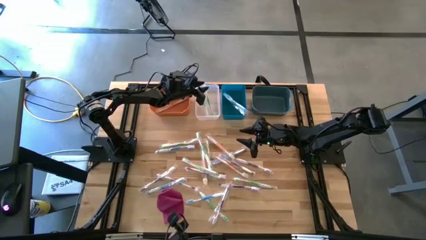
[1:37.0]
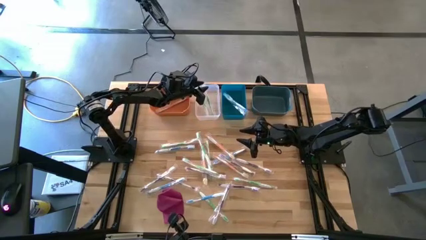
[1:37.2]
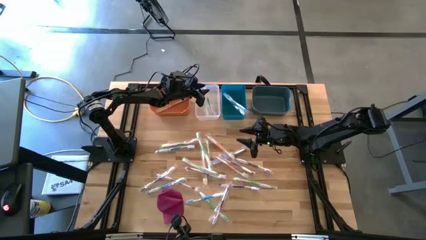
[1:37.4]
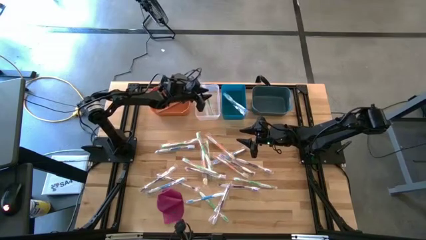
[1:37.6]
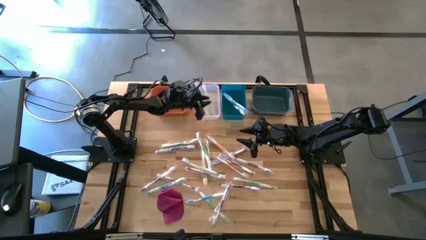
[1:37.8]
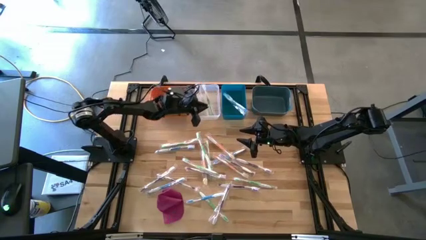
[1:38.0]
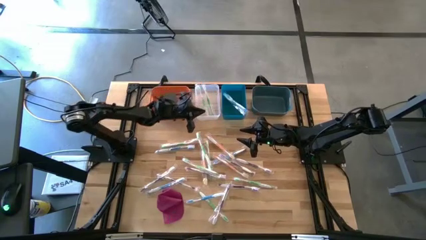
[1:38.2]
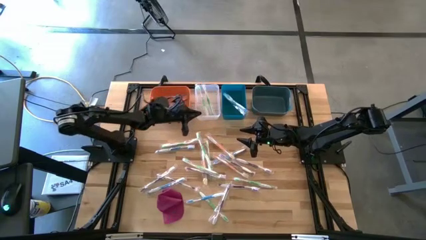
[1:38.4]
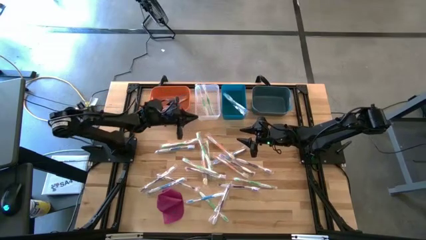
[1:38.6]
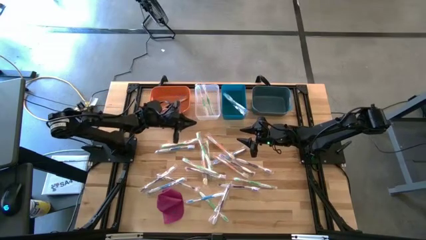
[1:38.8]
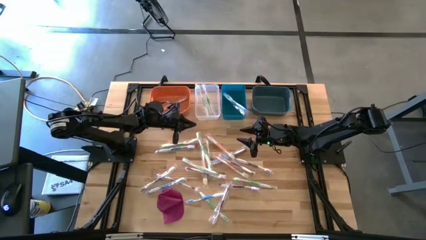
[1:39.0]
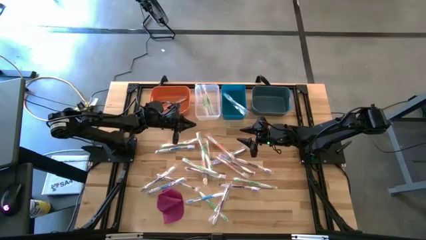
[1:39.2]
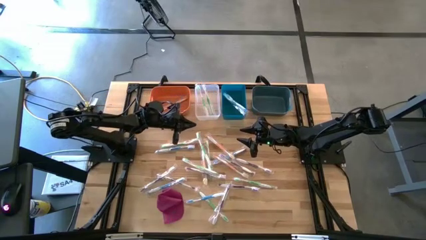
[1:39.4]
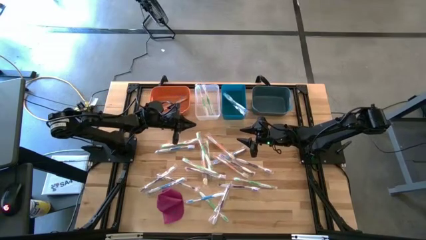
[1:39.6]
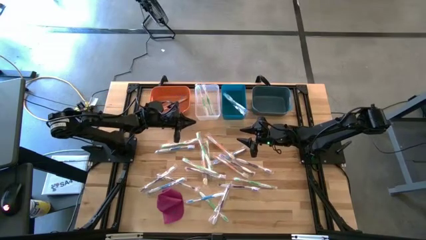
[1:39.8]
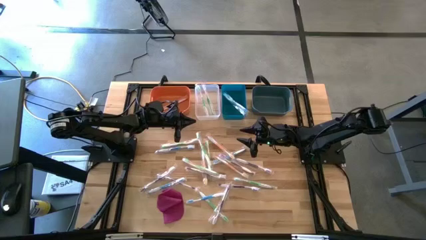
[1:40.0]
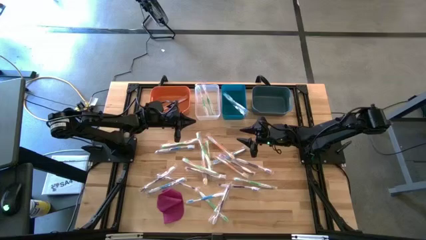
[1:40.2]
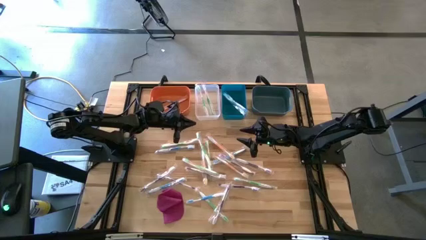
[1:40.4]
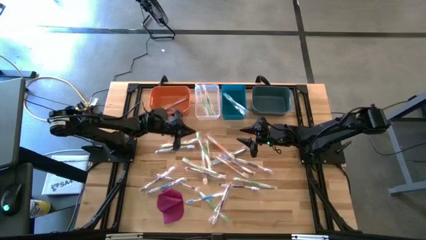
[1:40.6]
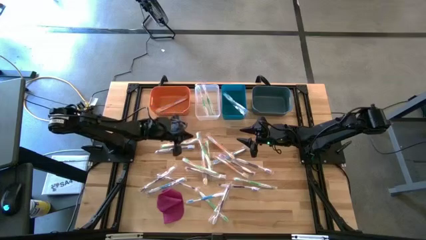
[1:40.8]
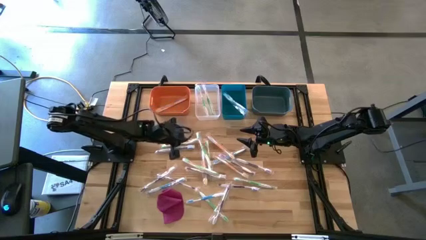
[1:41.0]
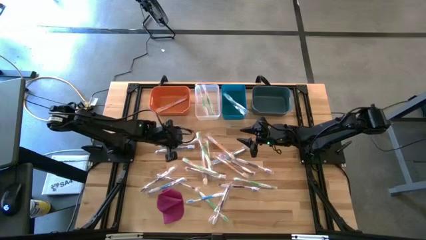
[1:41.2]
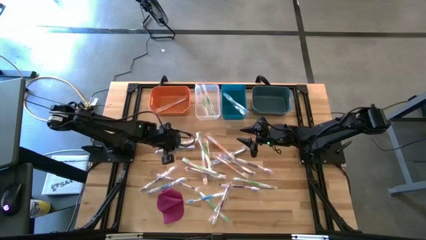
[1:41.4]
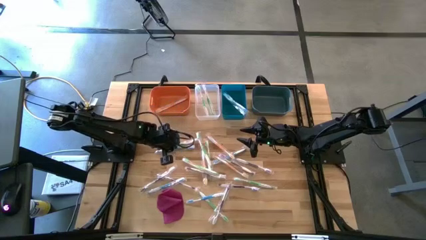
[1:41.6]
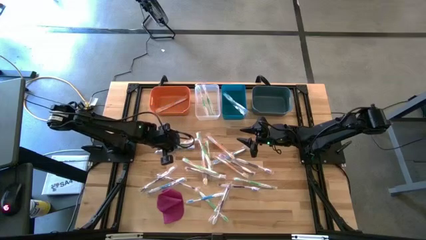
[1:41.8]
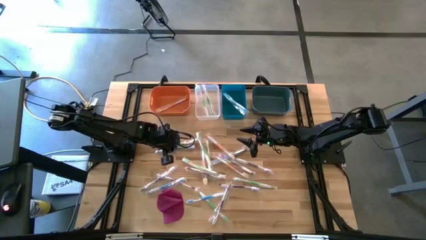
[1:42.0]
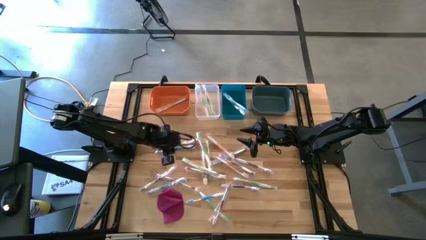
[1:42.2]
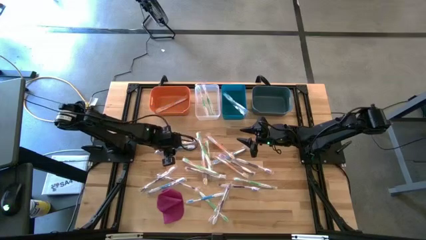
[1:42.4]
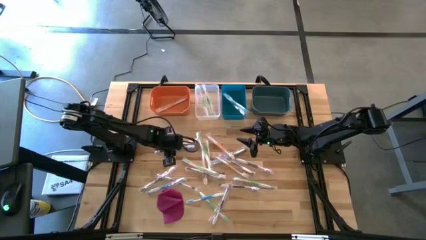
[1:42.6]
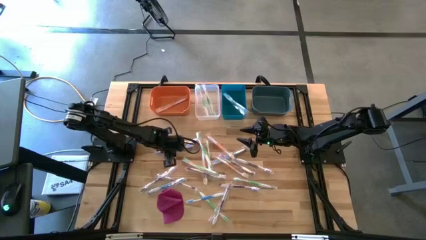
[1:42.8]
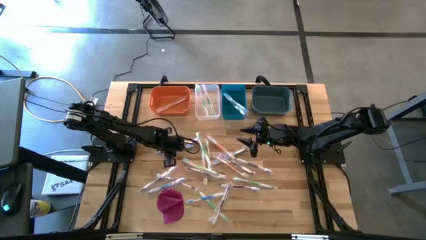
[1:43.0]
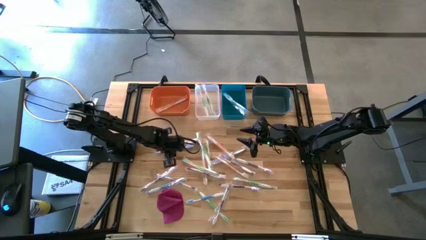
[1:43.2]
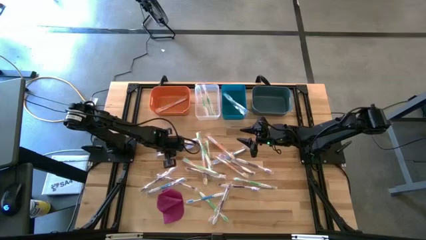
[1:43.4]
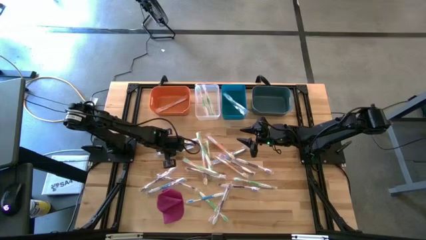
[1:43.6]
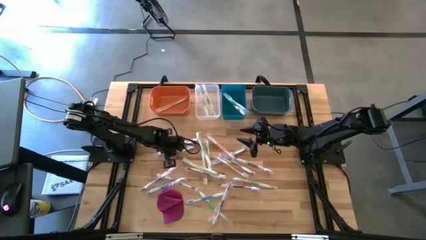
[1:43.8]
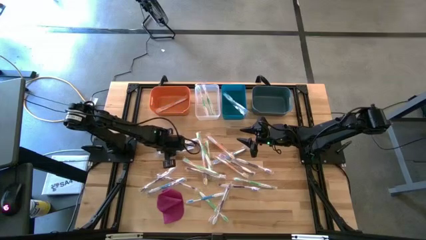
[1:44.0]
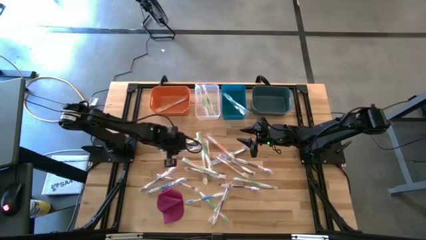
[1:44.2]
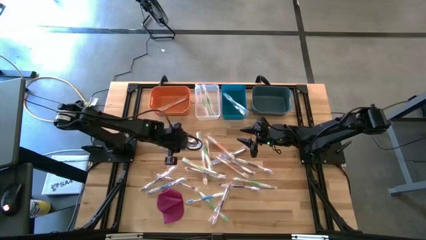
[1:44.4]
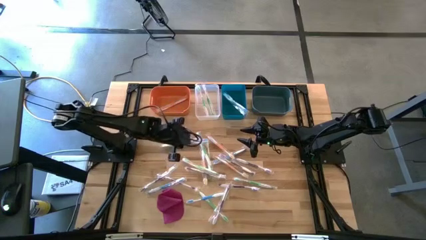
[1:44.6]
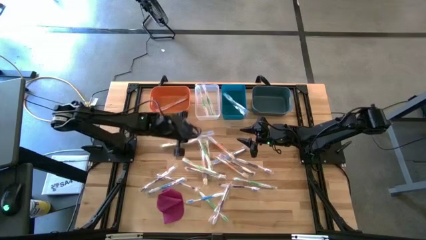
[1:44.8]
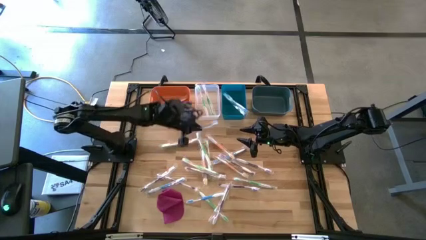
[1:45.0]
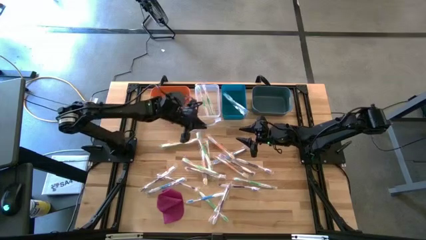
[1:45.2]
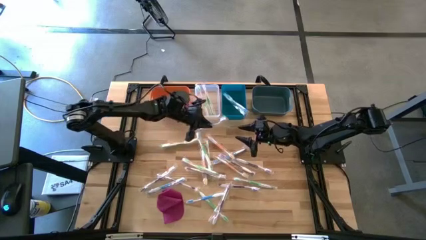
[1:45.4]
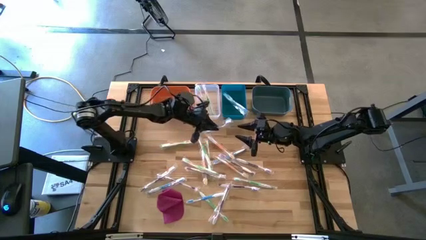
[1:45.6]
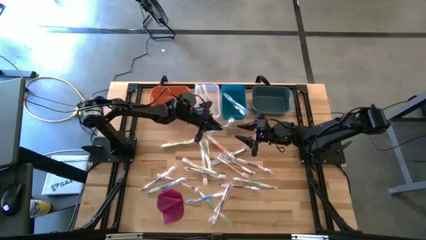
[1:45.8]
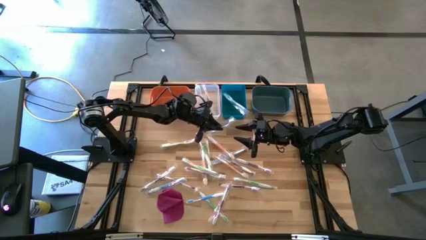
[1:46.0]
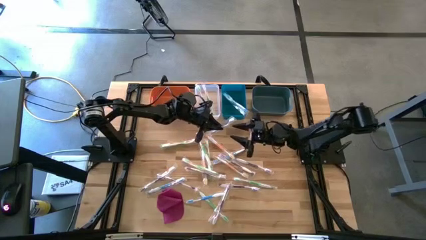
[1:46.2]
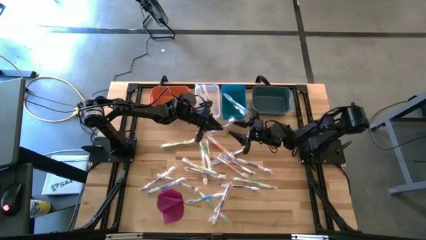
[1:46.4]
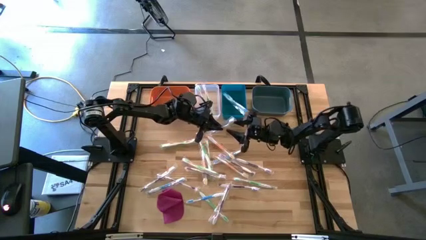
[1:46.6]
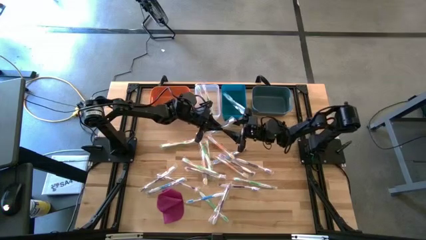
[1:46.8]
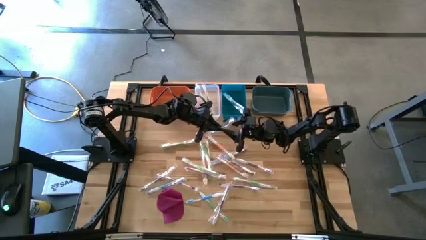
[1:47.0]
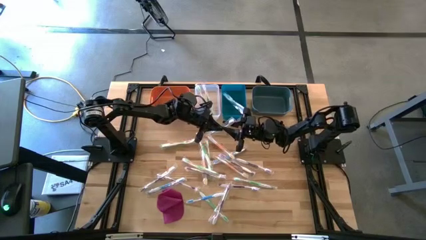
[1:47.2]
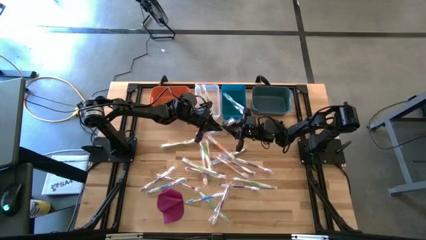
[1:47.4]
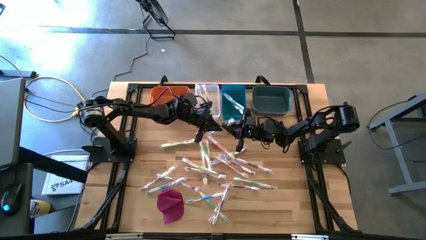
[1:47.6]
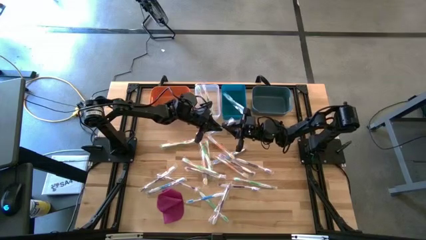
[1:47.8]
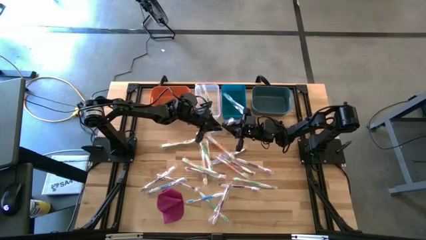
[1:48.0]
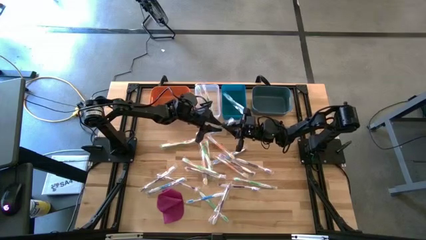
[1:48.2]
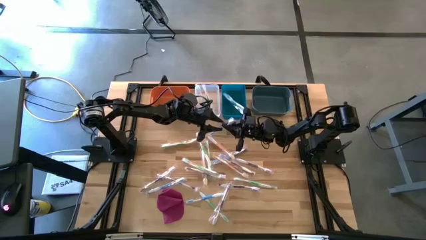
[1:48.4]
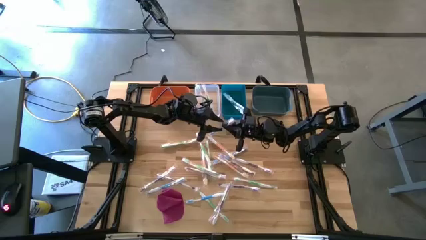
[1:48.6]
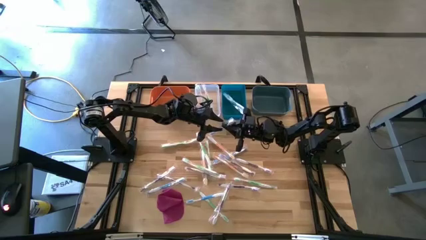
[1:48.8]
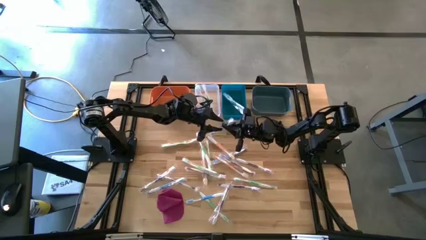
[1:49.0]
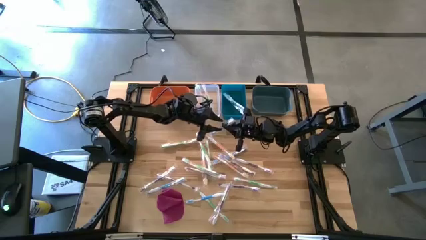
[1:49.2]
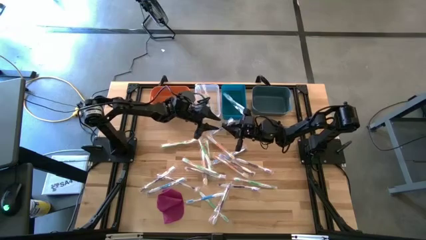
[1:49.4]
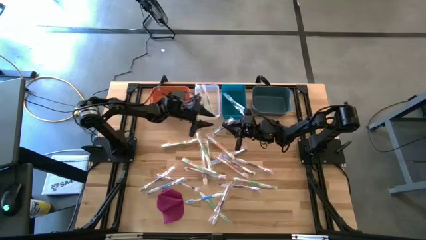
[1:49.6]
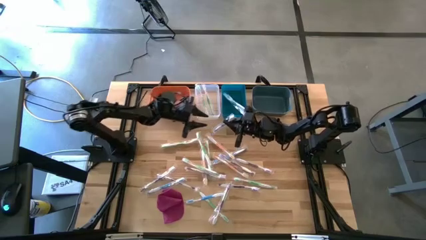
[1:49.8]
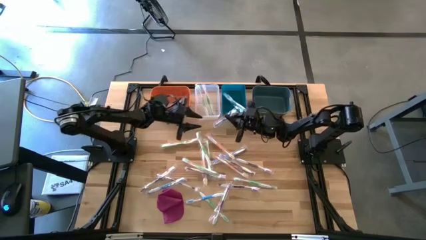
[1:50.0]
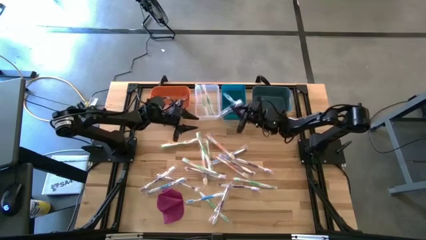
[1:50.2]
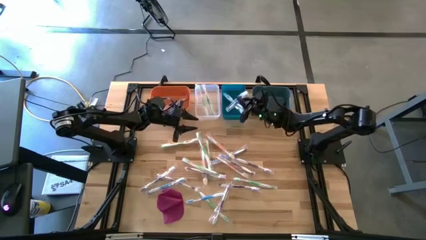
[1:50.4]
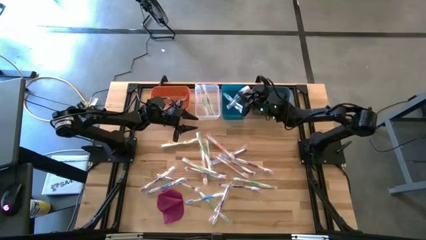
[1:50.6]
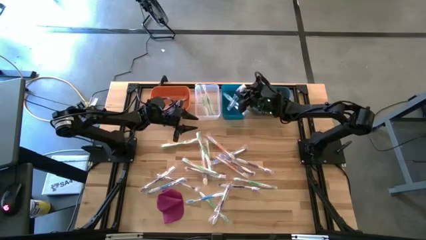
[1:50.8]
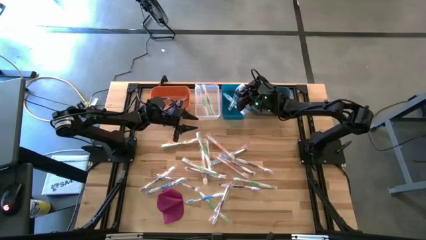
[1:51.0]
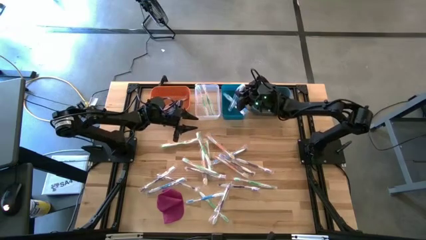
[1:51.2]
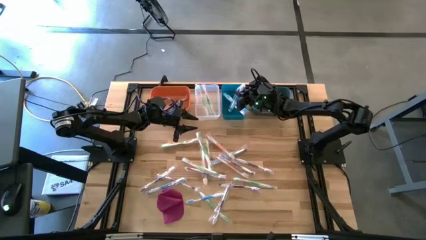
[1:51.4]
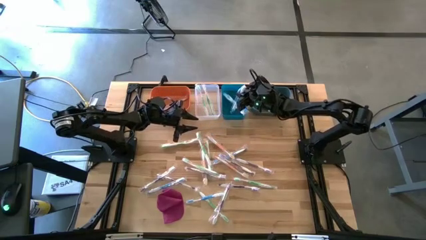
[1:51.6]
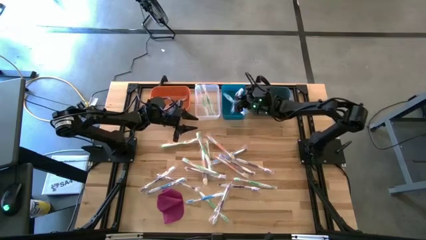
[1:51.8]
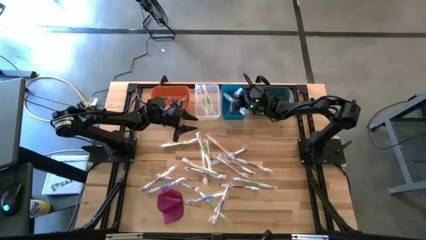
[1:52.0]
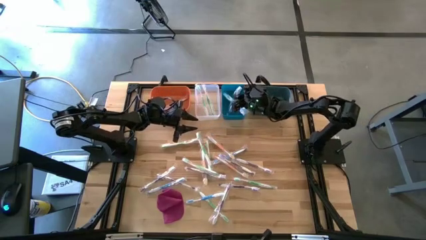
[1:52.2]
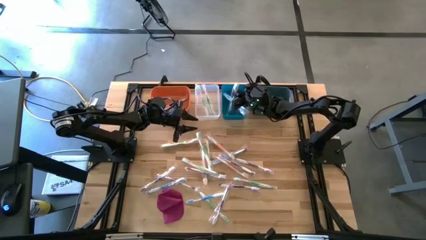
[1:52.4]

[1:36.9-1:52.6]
Task: Pick & Place Toothbrushes
Put the blue toothbrush into the blue bin
